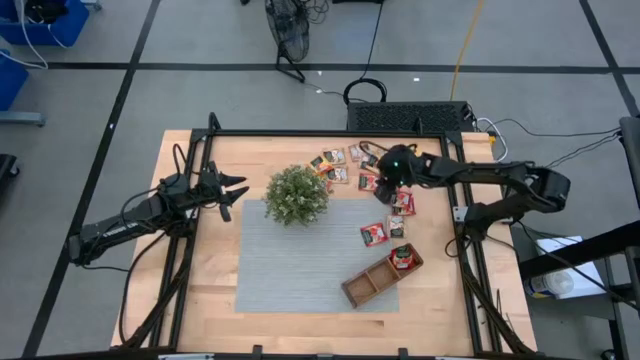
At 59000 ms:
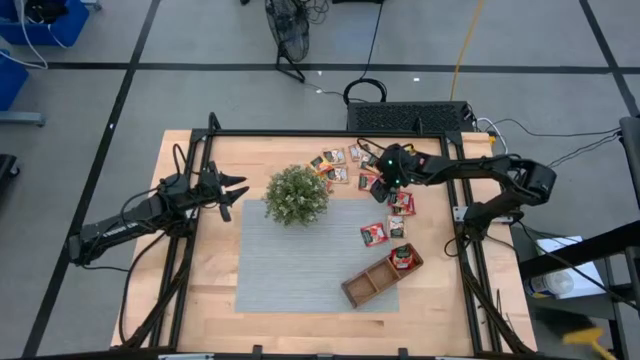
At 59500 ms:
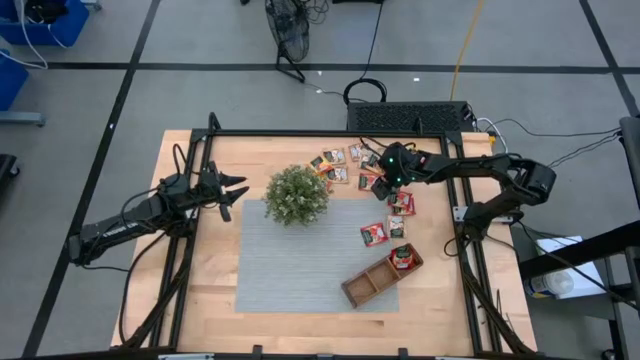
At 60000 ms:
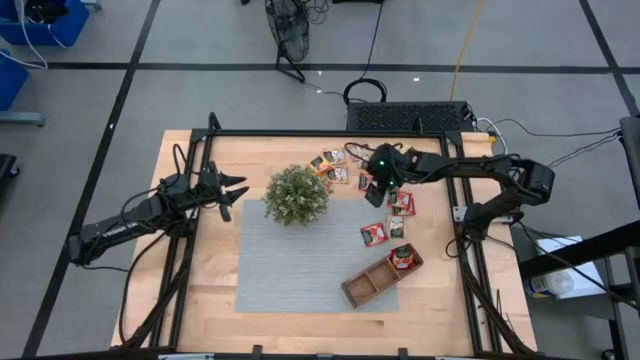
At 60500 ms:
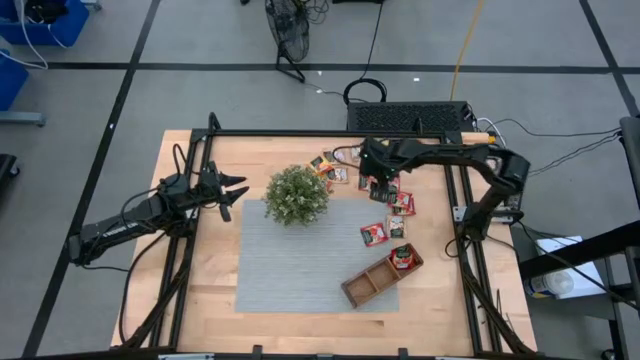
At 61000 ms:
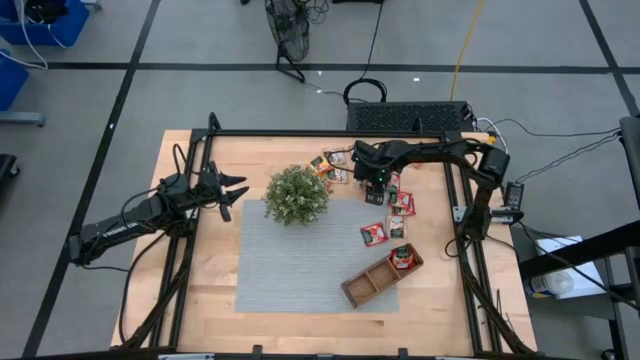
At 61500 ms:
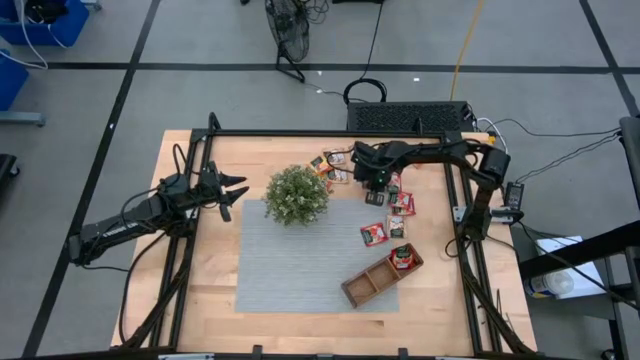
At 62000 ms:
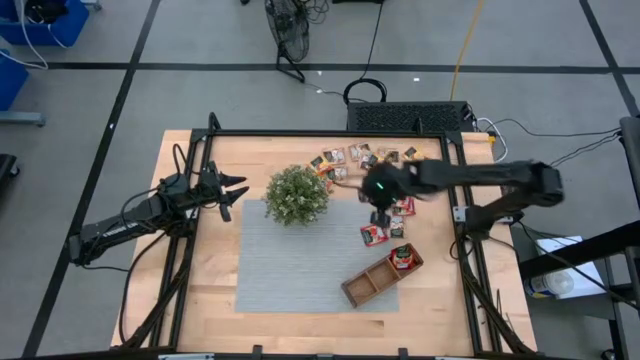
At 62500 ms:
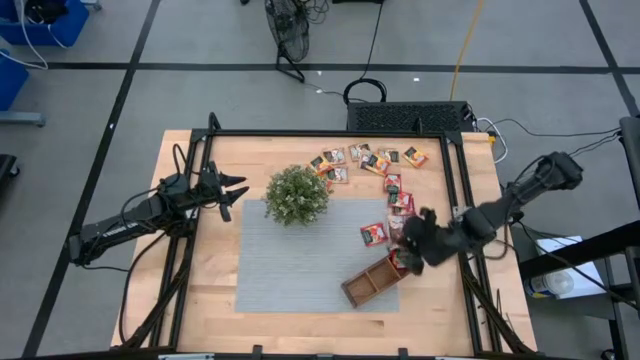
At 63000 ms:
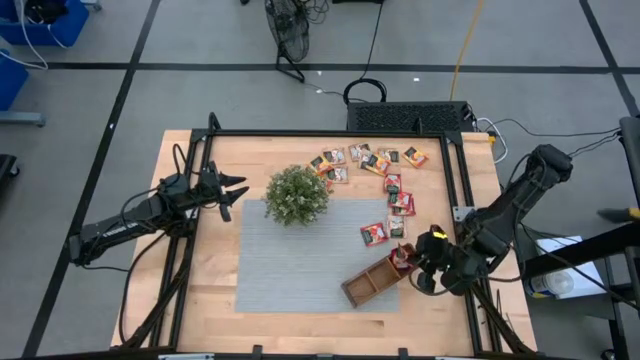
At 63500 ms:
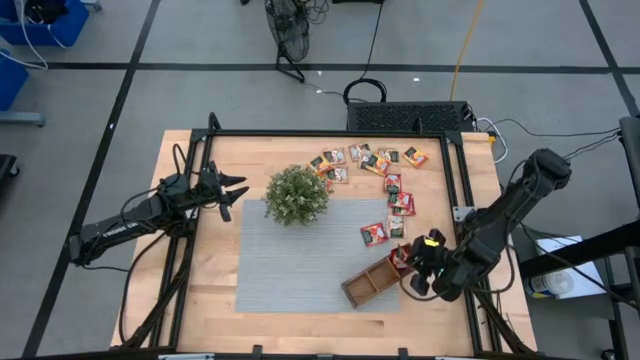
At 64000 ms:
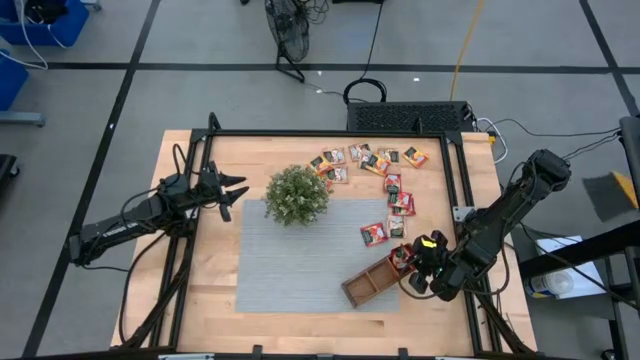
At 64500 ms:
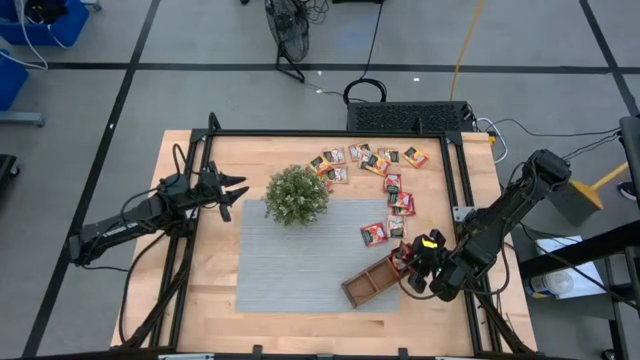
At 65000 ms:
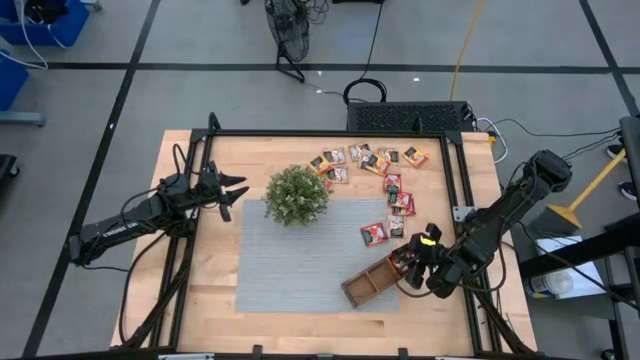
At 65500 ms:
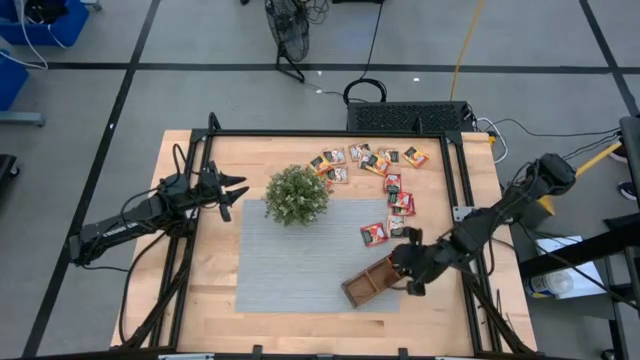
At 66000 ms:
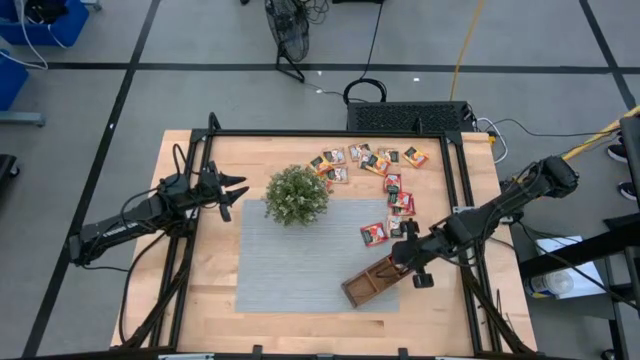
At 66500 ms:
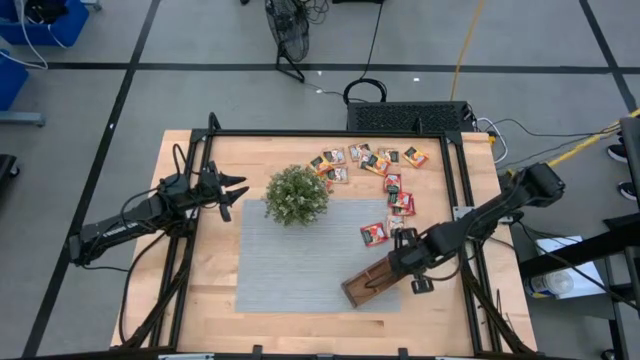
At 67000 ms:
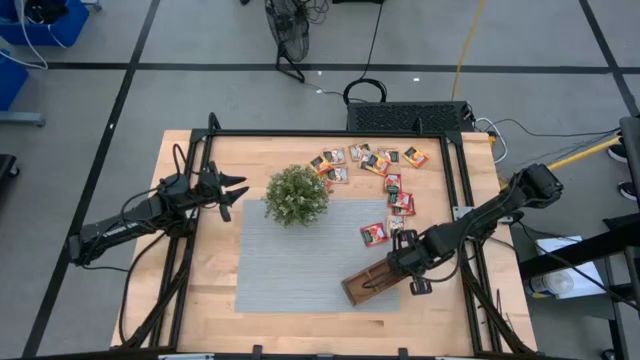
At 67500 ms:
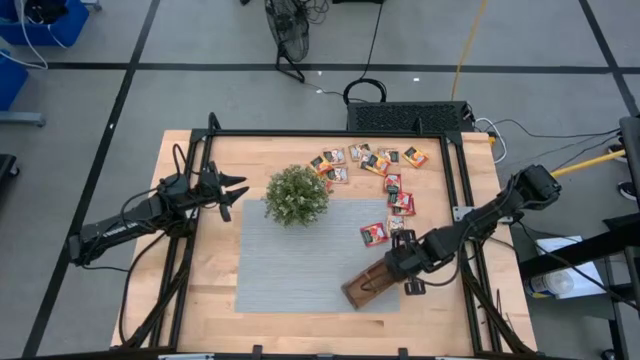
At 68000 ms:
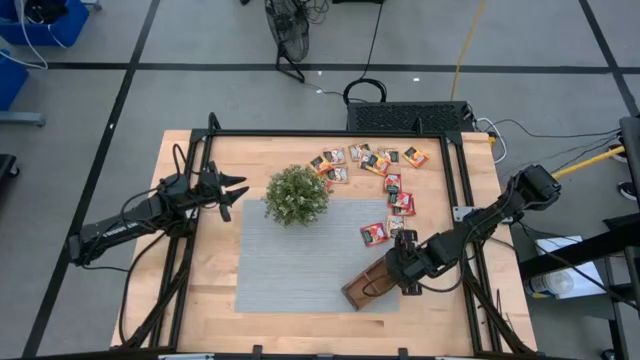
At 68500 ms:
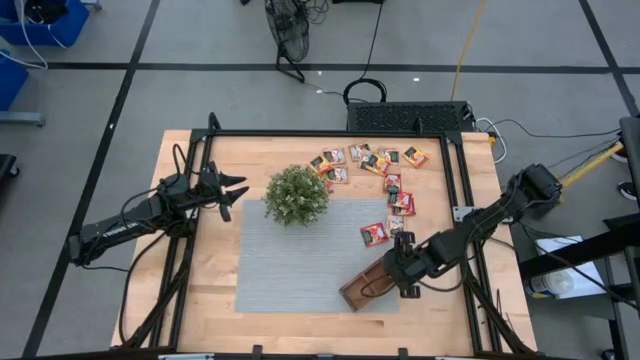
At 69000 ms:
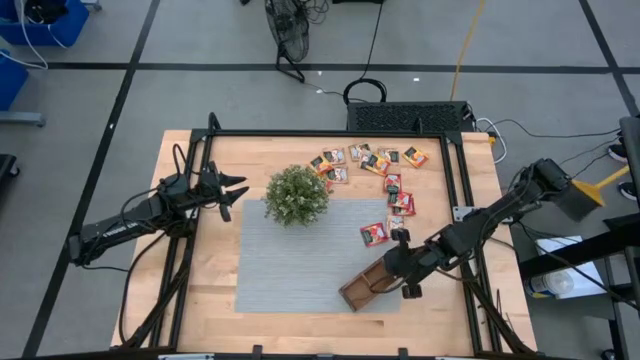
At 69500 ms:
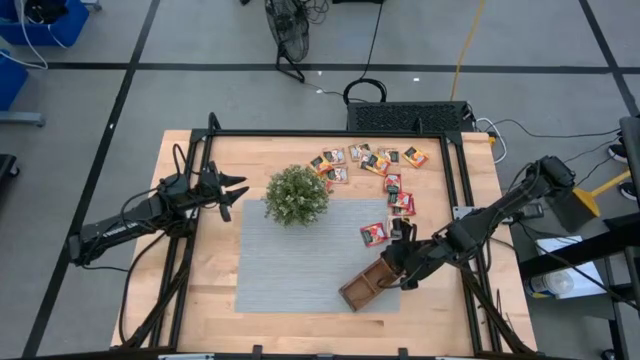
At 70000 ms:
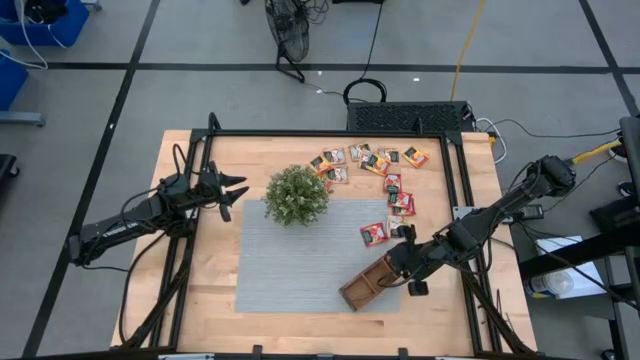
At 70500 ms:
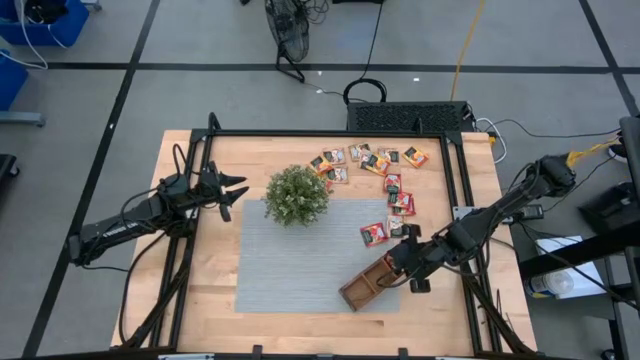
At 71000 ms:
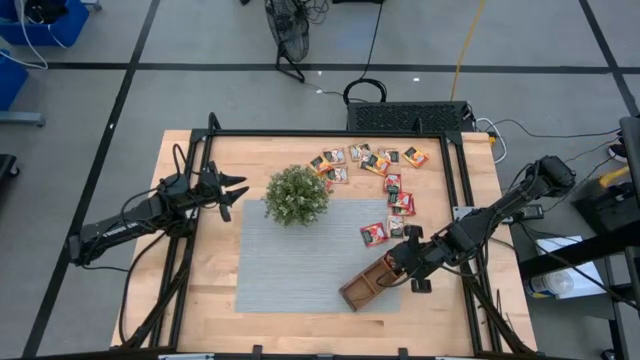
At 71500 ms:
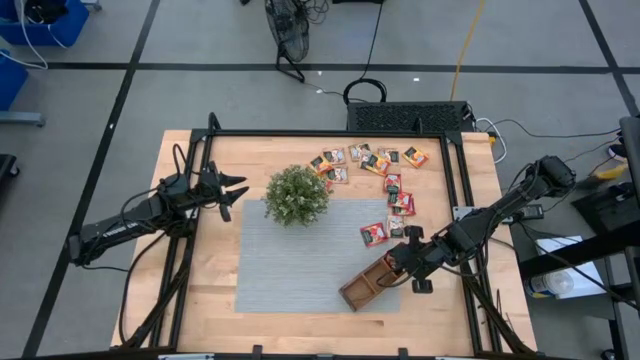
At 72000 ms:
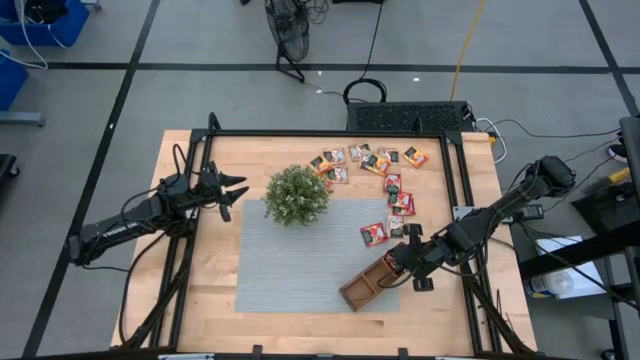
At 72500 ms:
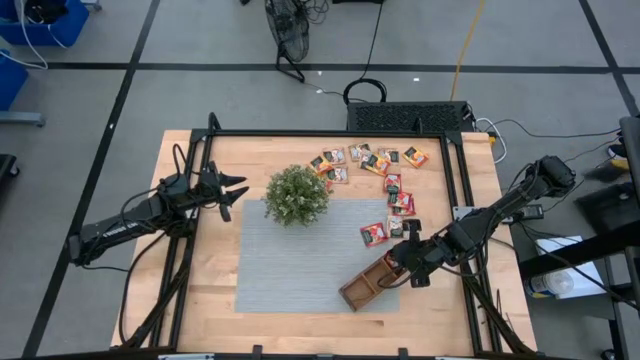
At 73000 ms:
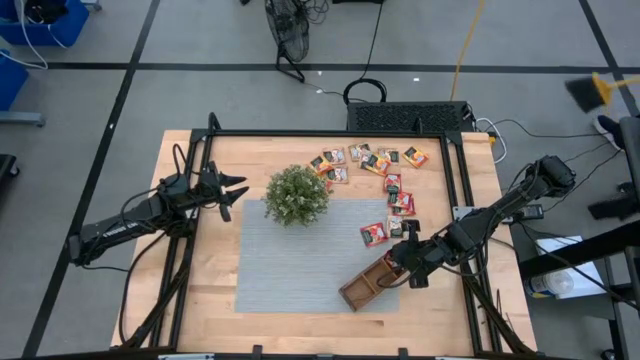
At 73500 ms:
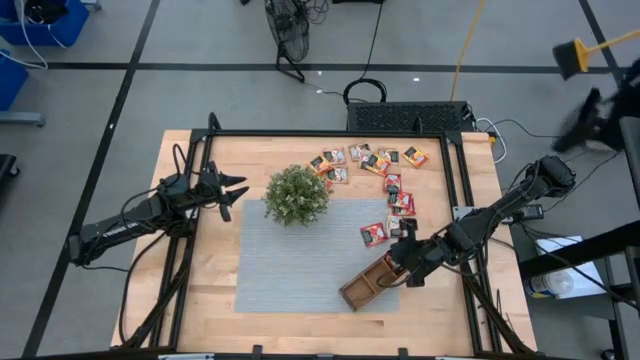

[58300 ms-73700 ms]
Task: Pick & Place Tea
Put the strawberry tea sachet into the brown organizer
